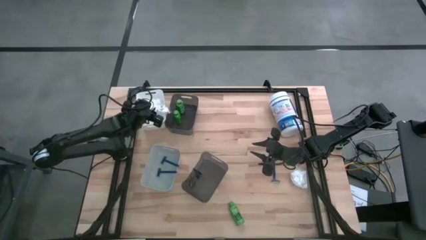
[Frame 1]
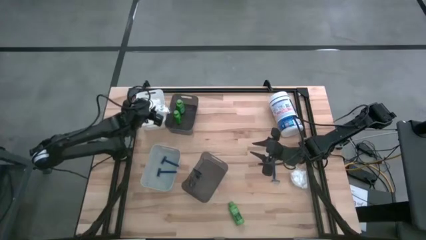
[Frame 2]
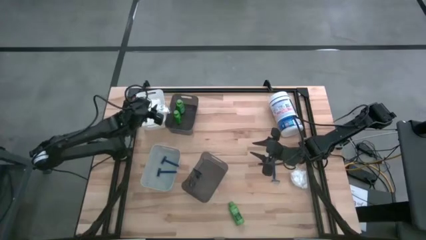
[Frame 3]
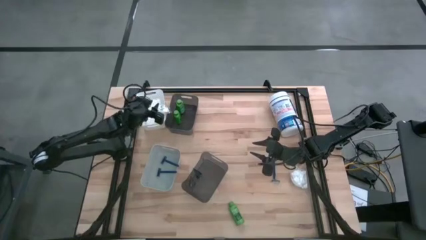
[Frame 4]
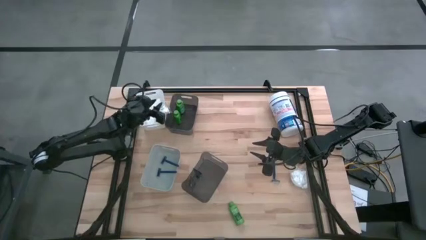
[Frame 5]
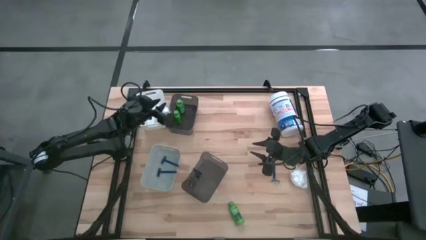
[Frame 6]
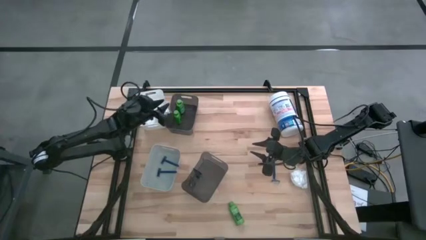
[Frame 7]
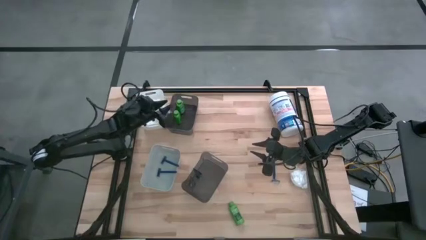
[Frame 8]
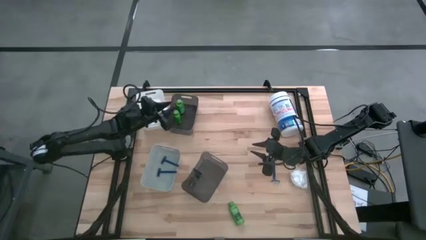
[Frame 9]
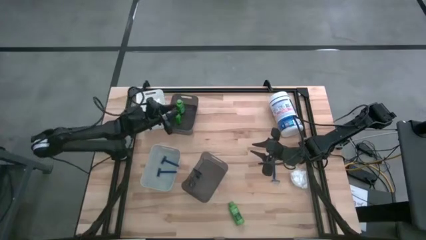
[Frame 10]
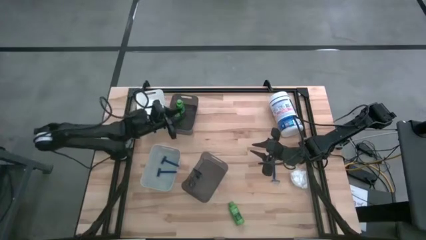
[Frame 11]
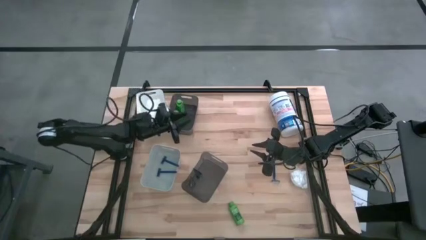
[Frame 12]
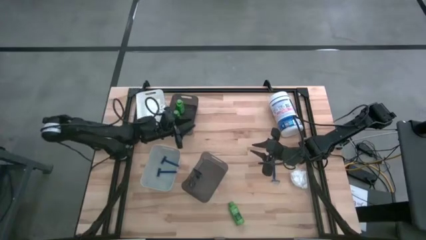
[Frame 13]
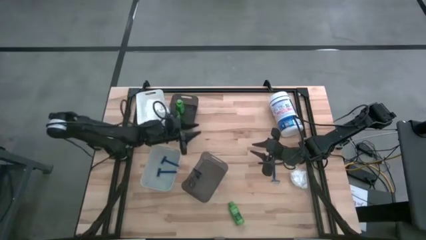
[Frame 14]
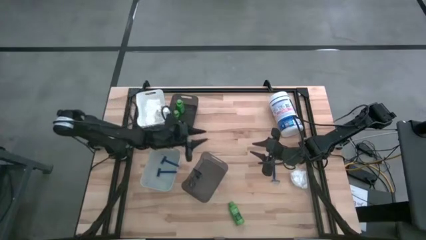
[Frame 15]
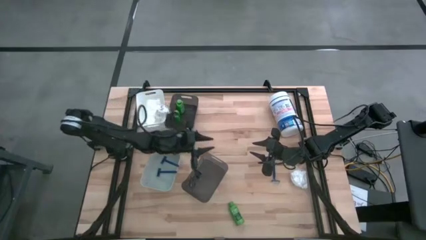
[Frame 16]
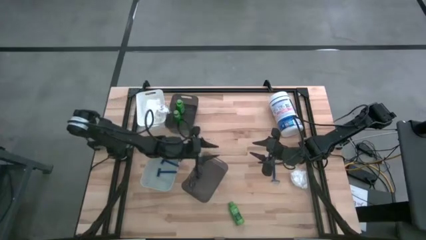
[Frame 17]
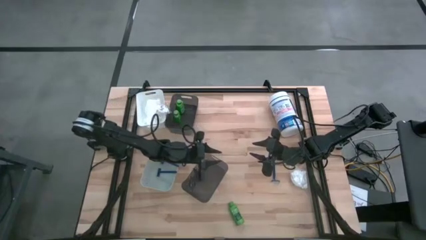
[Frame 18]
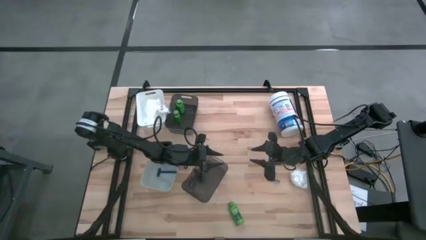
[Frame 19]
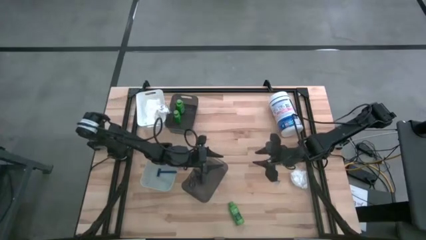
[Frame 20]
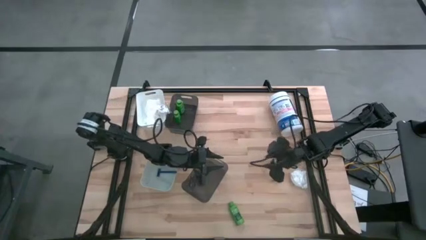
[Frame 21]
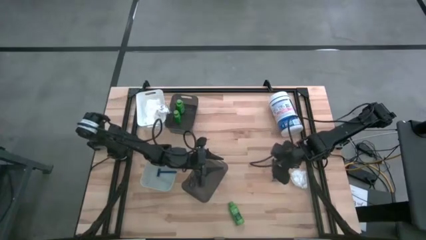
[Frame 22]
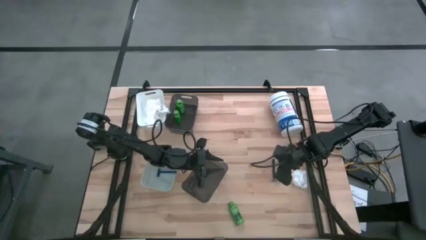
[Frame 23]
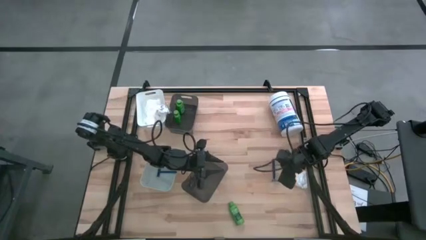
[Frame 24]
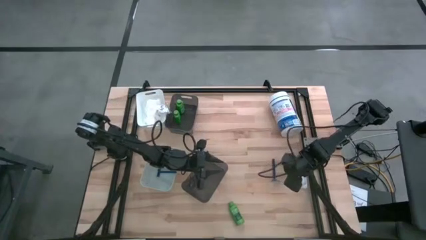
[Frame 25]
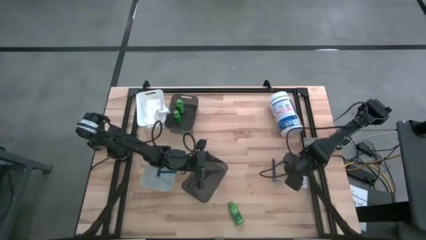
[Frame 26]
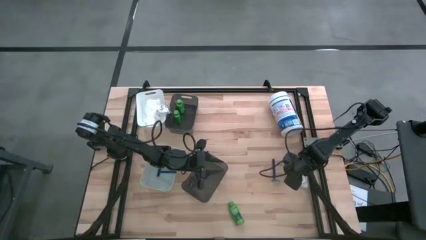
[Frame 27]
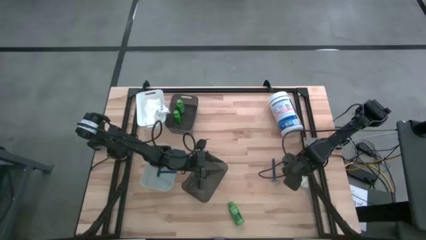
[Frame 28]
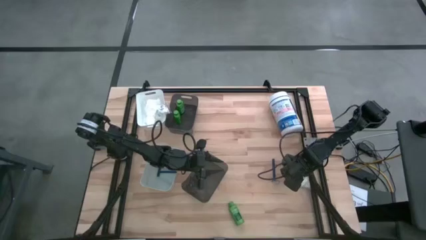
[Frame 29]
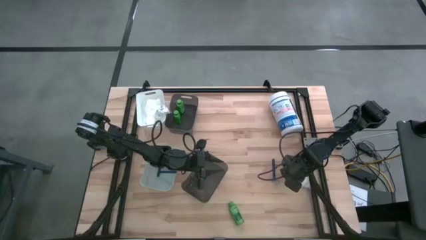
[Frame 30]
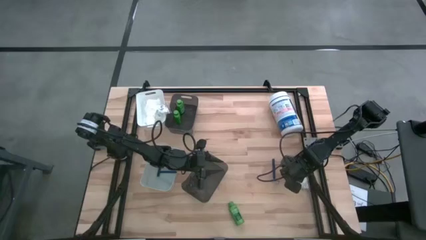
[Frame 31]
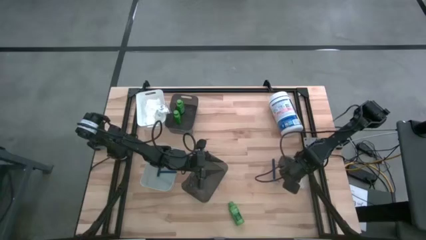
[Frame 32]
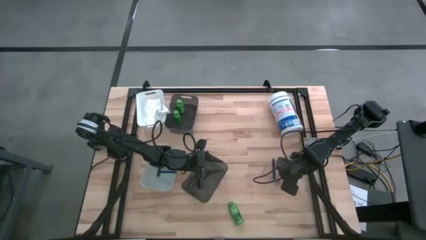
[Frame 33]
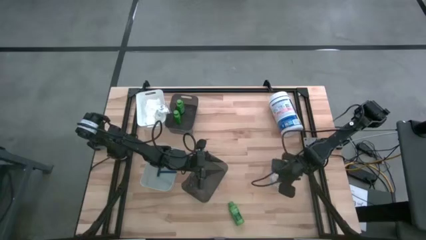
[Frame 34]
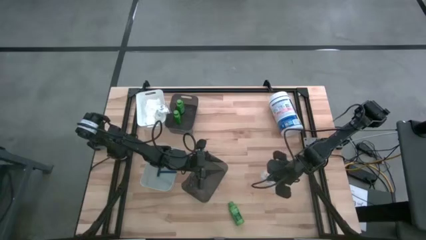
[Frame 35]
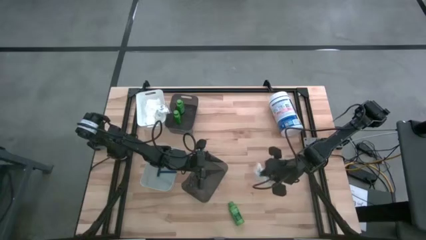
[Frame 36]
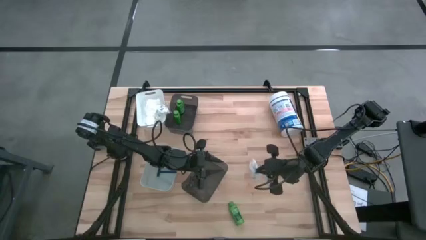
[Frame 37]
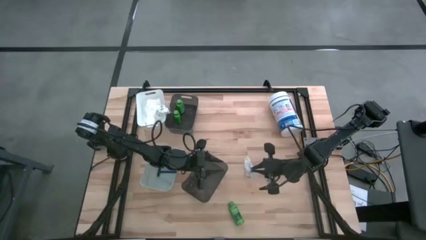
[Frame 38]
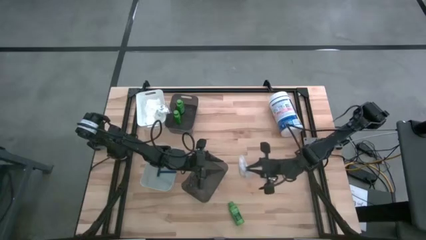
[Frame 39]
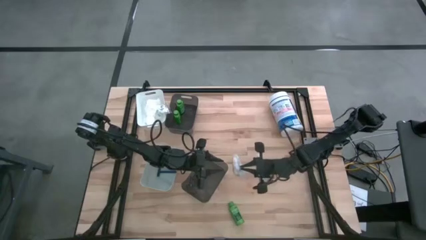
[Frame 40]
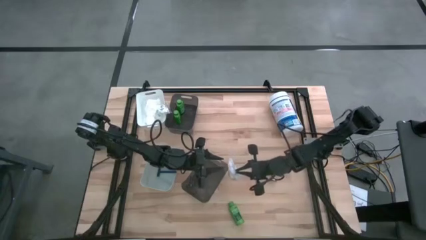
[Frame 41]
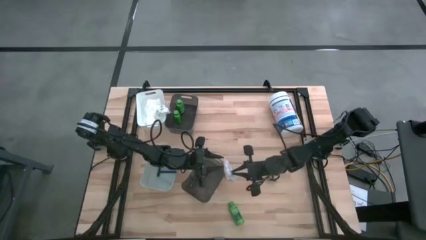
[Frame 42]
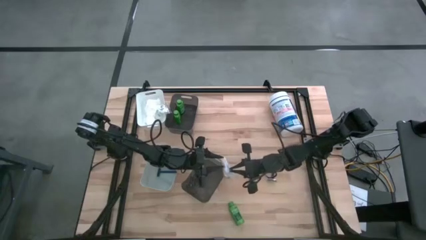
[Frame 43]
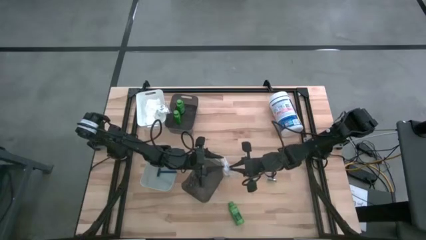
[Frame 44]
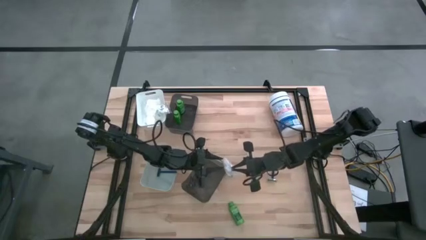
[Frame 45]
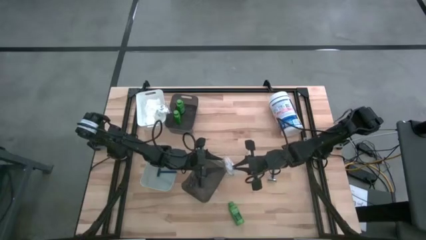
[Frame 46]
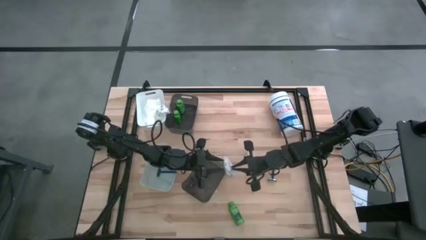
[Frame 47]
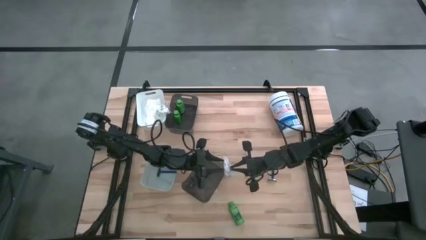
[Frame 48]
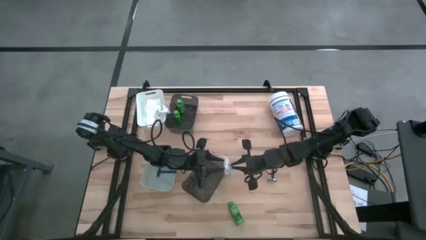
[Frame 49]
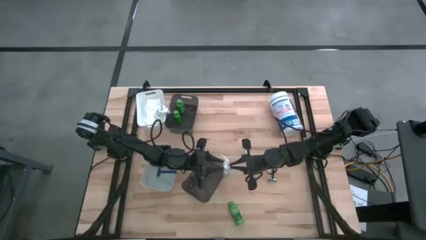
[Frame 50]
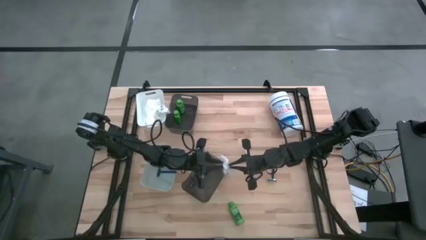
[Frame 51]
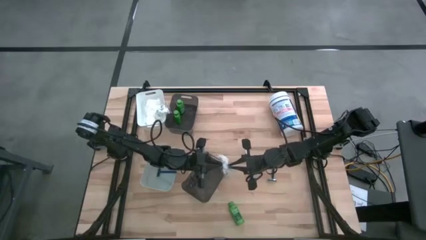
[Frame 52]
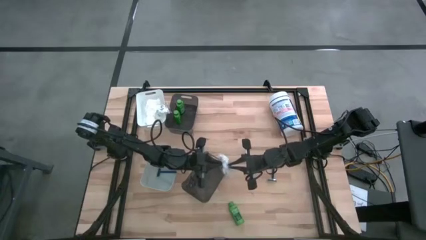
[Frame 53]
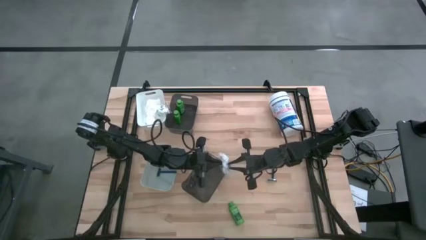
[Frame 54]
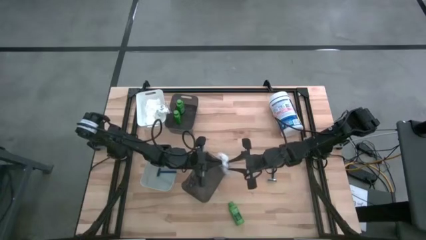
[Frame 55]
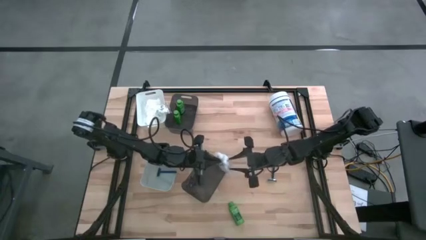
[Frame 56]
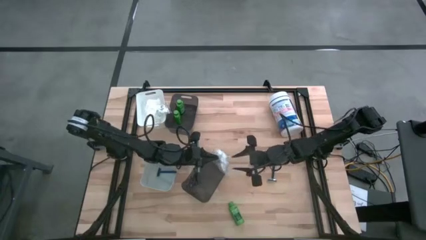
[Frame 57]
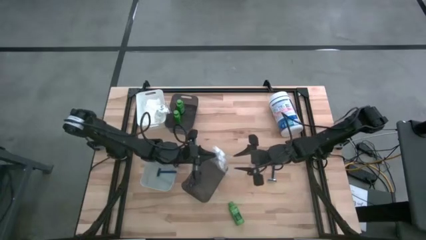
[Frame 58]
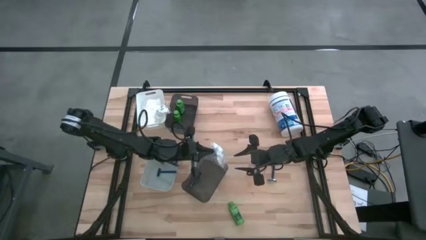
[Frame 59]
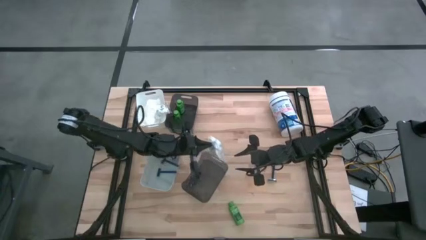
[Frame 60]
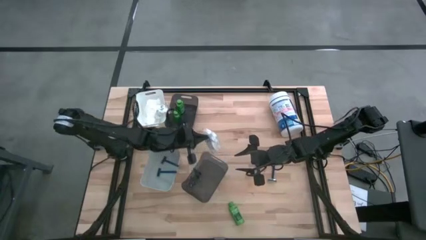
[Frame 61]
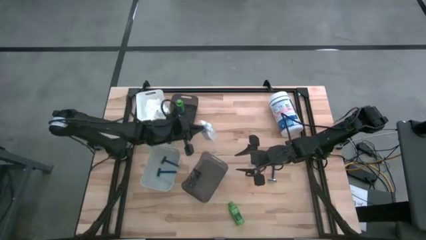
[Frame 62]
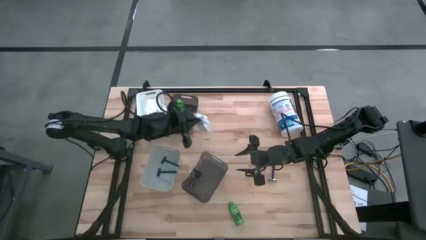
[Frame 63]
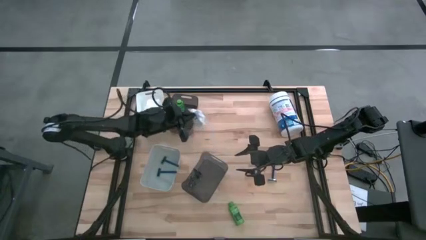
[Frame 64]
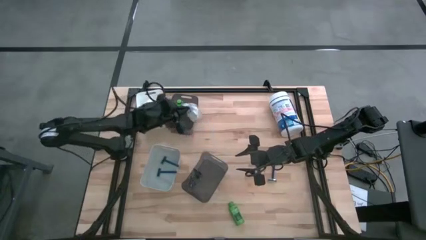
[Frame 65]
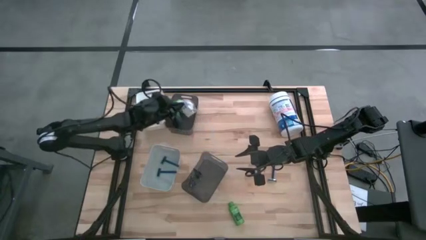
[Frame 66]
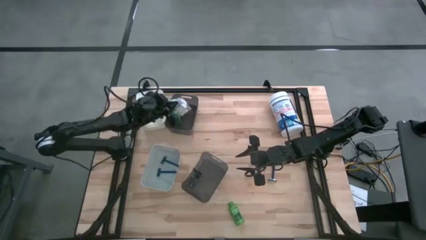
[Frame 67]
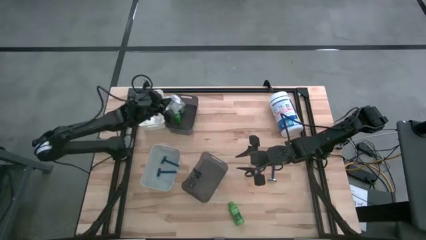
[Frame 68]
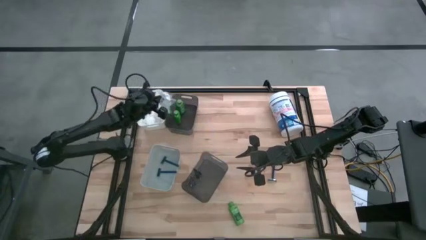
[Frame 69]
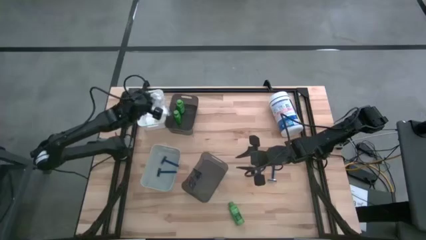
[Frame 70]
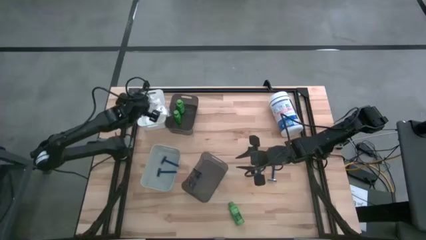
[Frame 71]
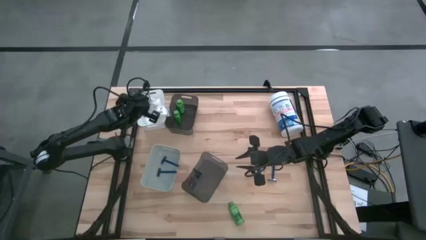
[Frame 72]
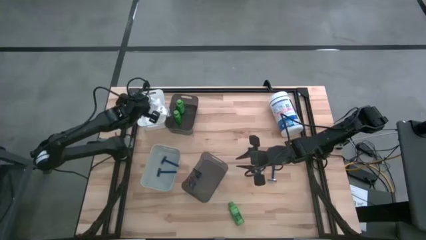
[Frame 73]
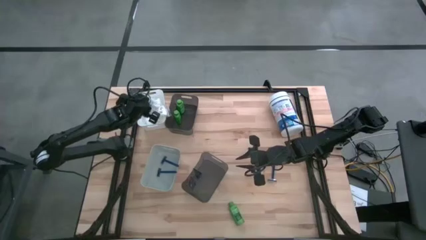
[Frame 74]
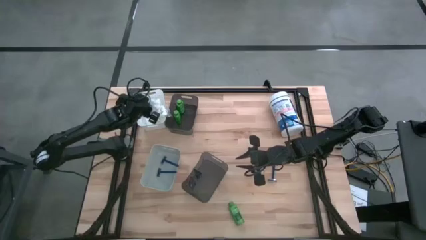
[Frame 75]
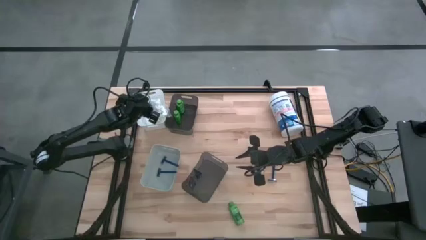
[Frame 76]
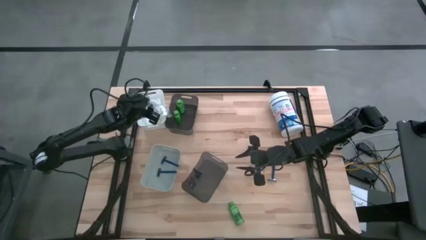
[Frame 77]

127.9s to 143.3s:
Task: Pick & Place Travel size toiletries
Put the cotton pack into the white bin

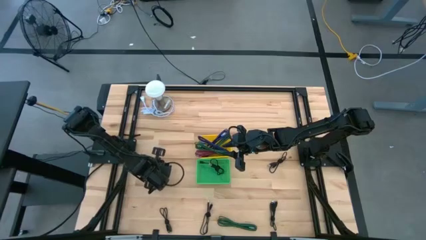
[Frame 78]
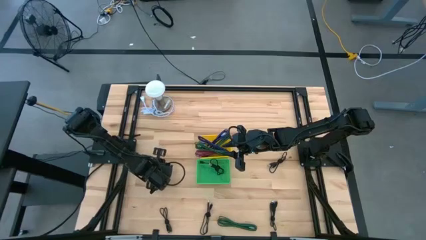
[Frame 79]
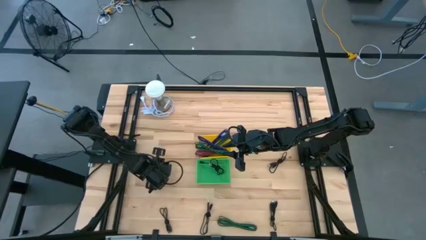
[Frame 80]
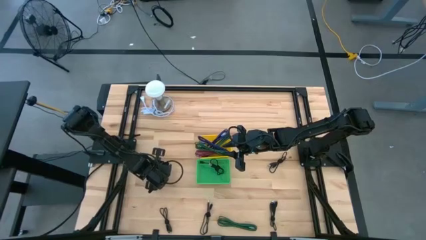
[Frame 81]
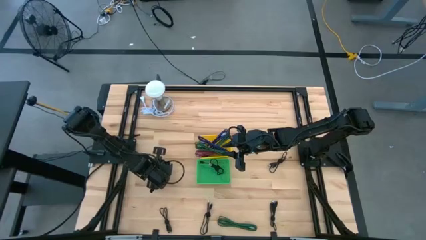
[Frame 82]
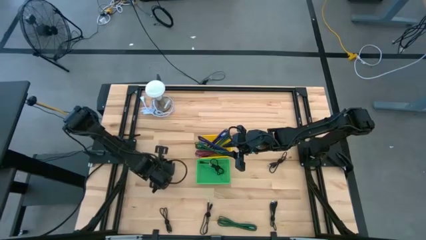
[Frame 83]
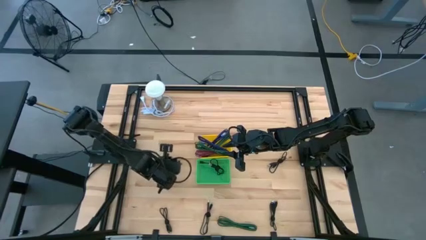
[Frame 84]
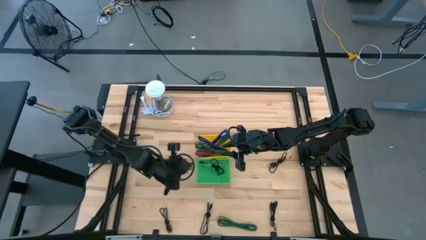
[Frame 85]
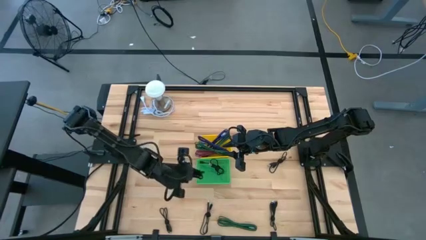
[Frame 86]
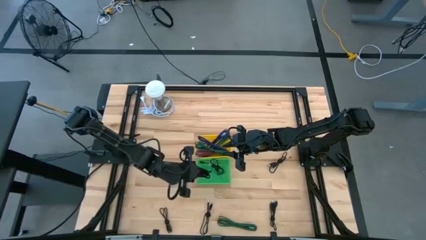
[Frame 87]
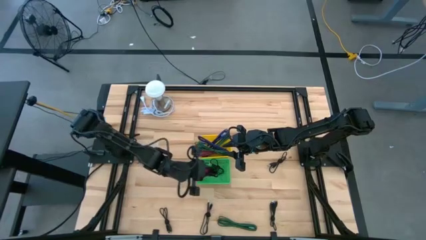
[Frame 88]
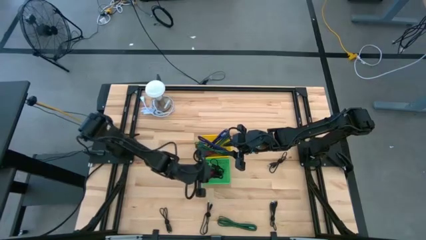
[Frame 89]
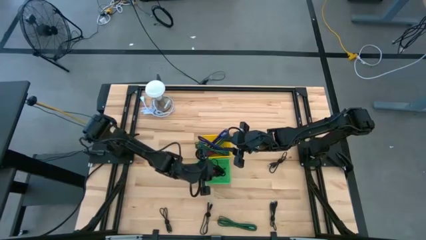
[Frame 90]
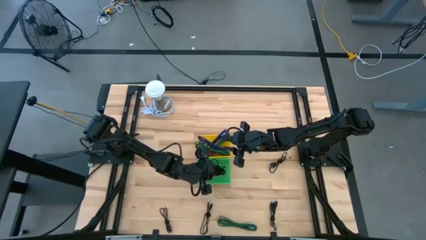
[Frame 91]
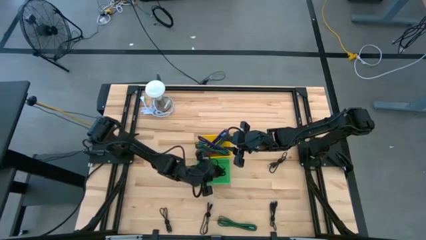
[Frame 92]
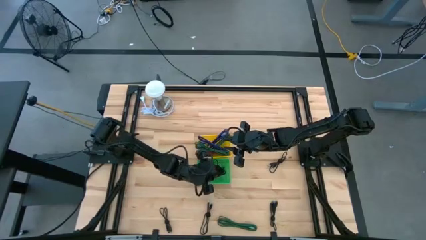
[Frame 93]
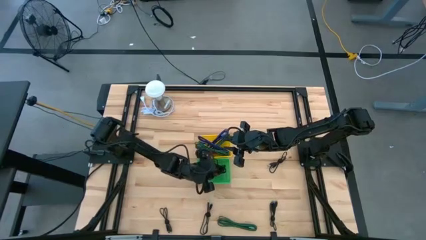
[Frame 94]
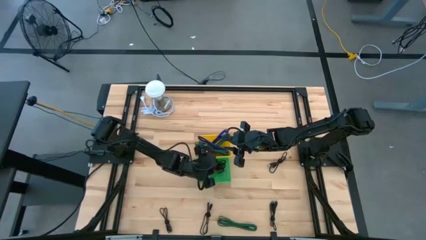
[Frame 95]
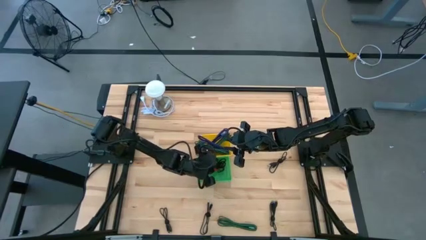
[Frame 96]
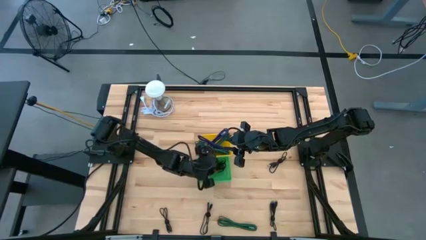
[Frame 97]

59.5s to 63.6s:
Task: Pick & Place USB Port
Put the black USB cable into the green bin
